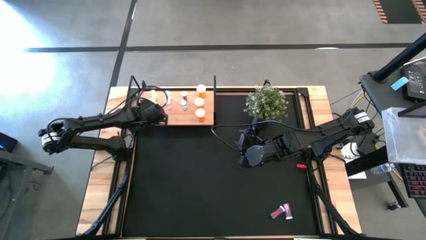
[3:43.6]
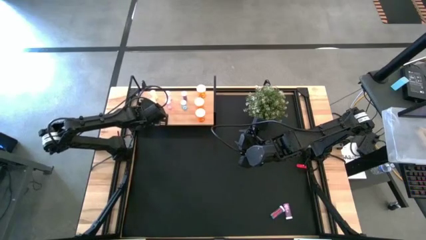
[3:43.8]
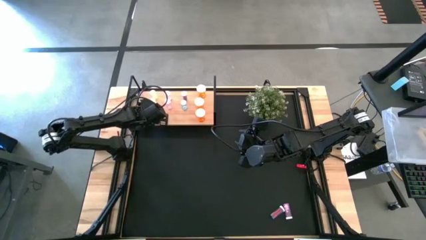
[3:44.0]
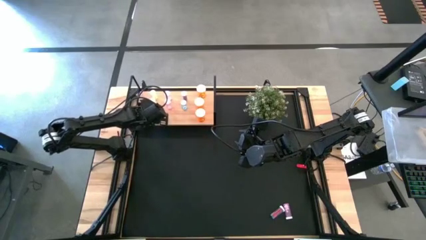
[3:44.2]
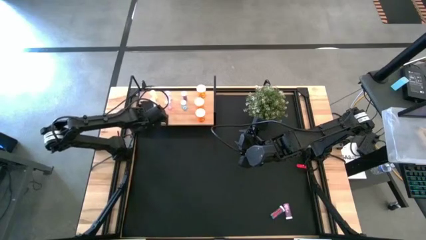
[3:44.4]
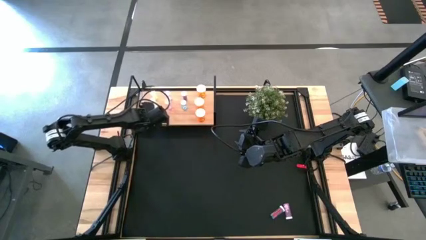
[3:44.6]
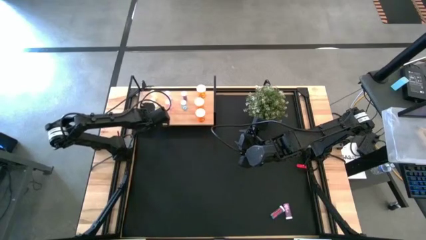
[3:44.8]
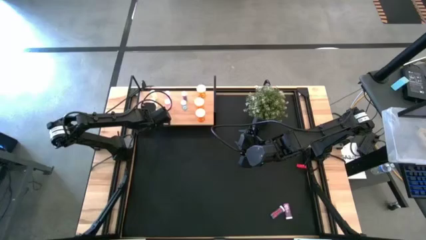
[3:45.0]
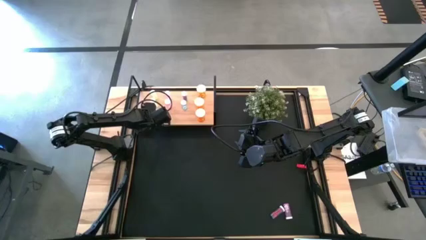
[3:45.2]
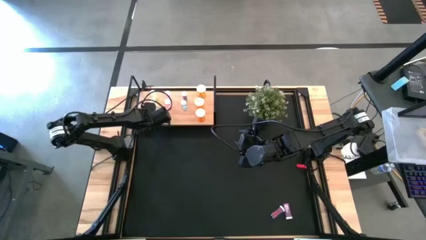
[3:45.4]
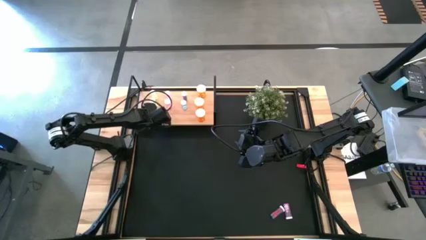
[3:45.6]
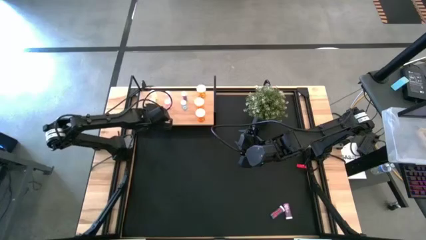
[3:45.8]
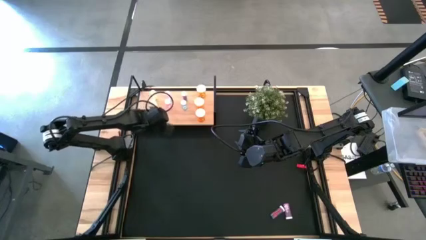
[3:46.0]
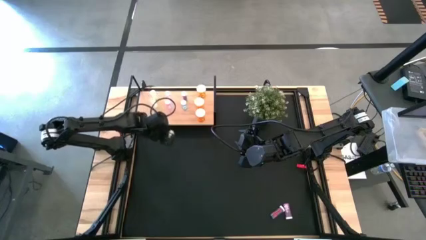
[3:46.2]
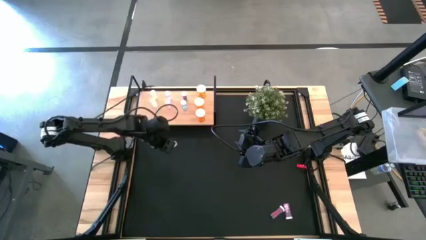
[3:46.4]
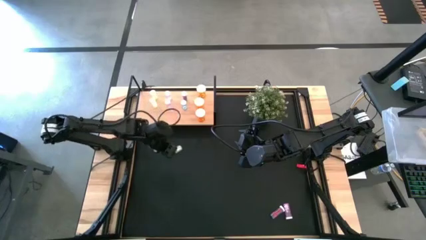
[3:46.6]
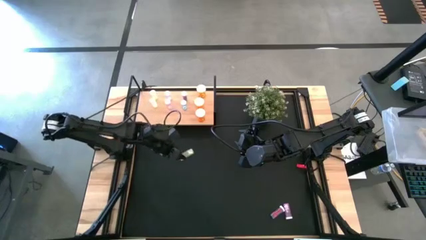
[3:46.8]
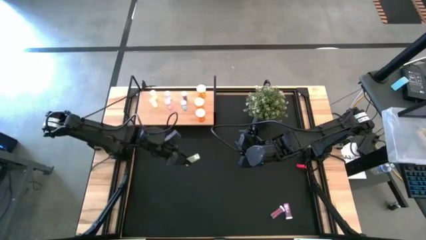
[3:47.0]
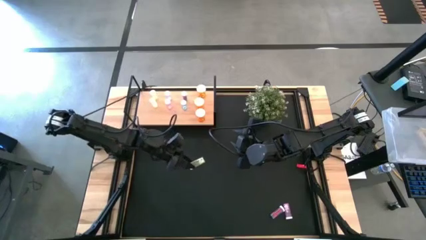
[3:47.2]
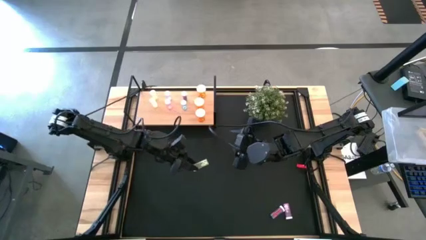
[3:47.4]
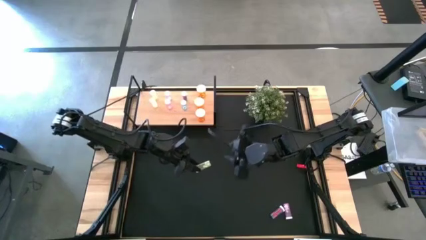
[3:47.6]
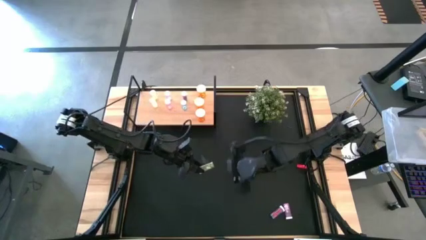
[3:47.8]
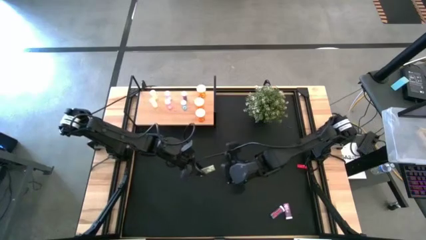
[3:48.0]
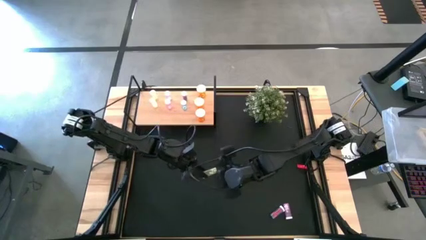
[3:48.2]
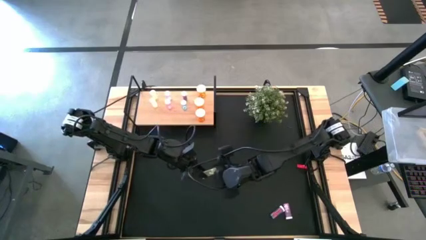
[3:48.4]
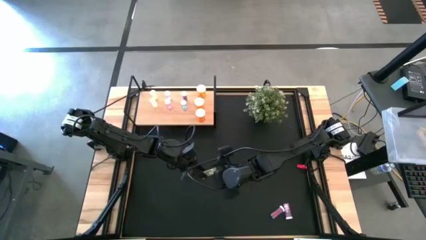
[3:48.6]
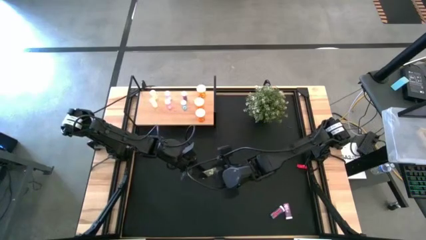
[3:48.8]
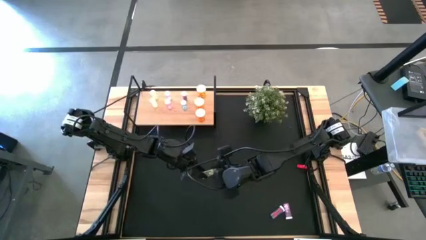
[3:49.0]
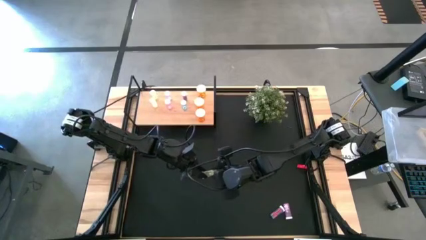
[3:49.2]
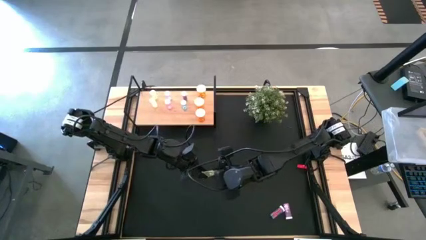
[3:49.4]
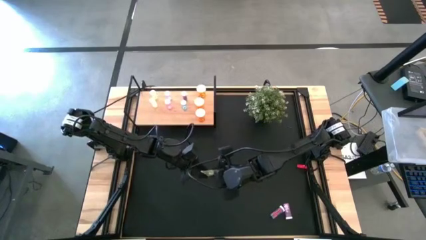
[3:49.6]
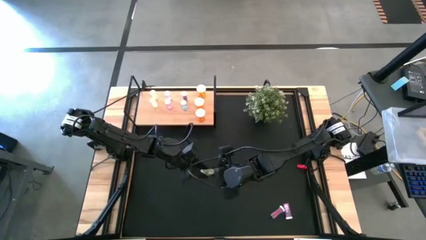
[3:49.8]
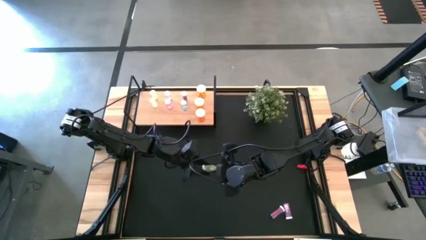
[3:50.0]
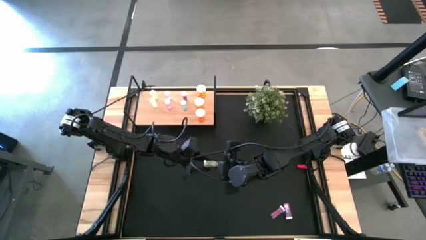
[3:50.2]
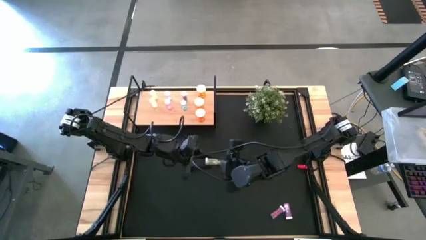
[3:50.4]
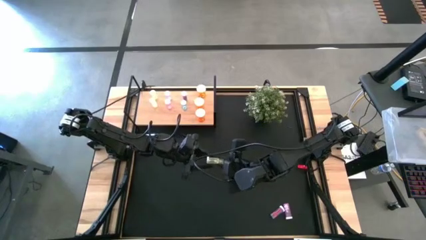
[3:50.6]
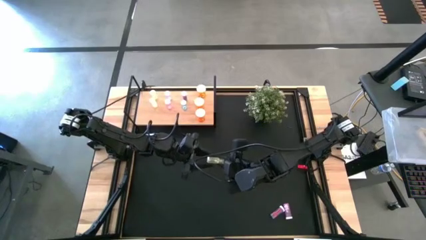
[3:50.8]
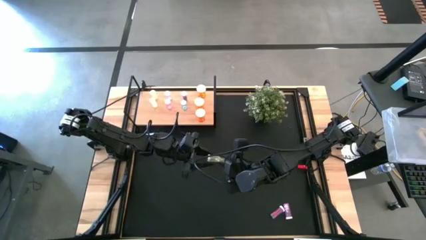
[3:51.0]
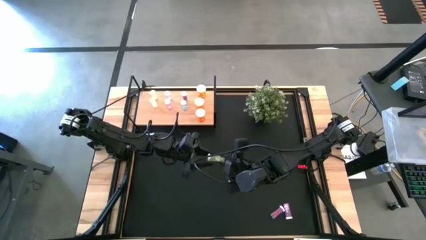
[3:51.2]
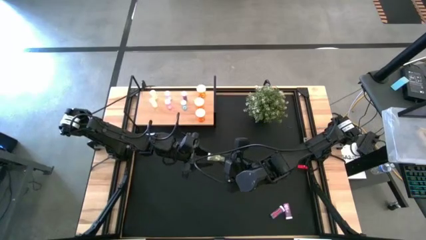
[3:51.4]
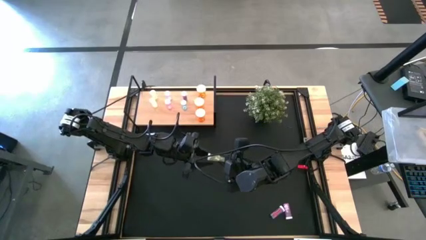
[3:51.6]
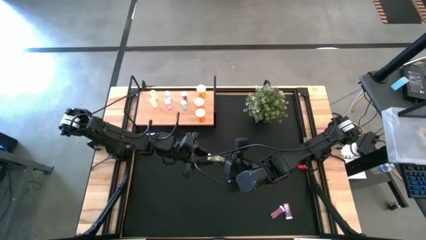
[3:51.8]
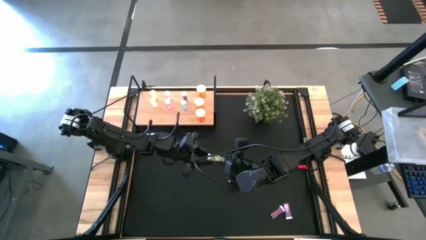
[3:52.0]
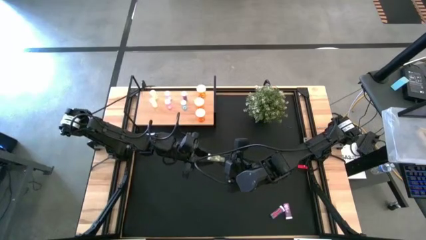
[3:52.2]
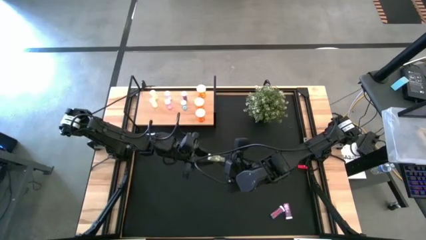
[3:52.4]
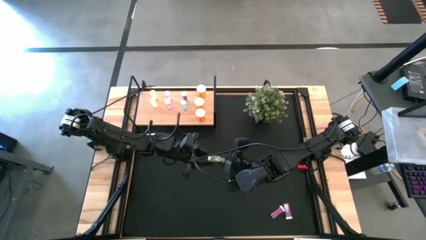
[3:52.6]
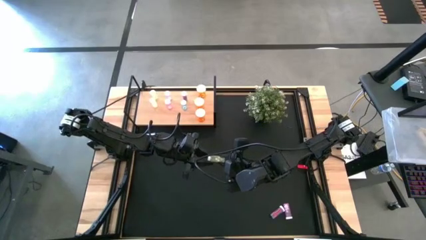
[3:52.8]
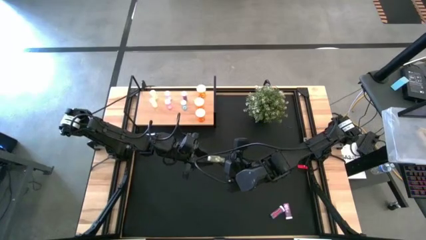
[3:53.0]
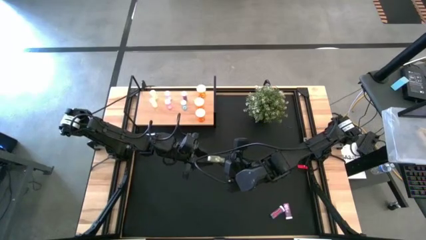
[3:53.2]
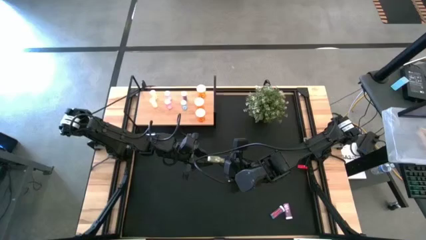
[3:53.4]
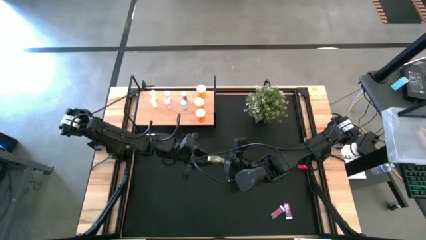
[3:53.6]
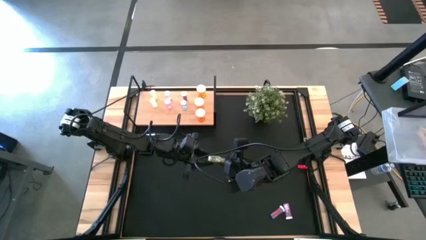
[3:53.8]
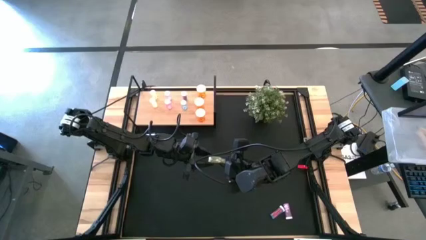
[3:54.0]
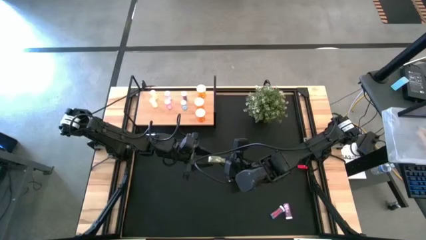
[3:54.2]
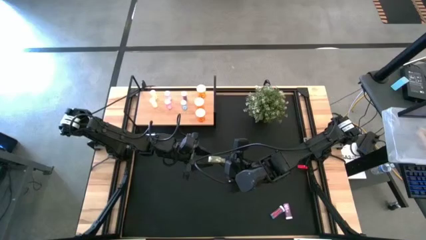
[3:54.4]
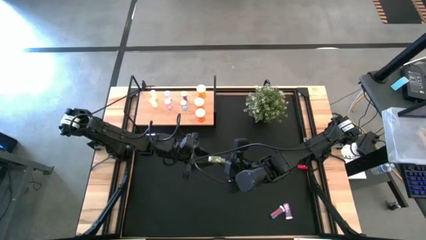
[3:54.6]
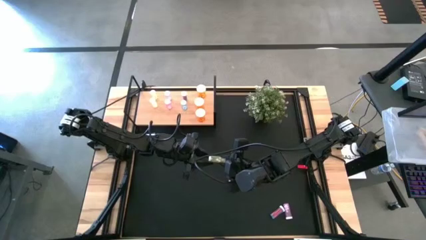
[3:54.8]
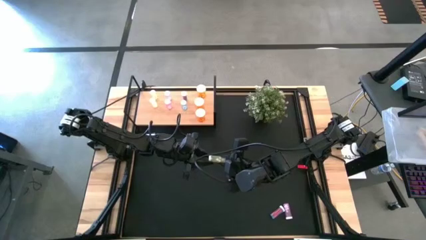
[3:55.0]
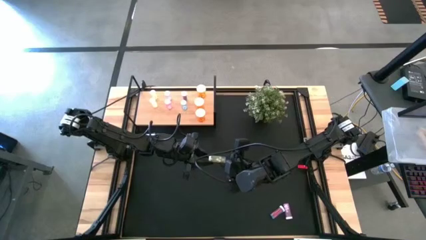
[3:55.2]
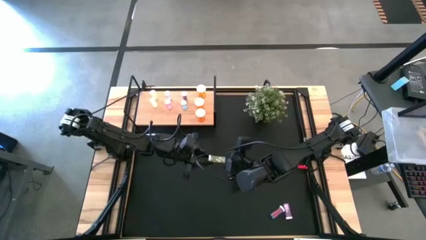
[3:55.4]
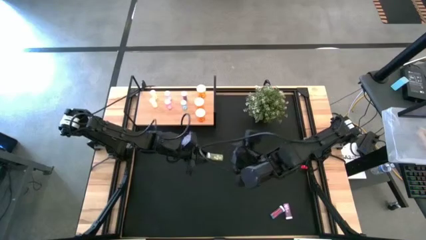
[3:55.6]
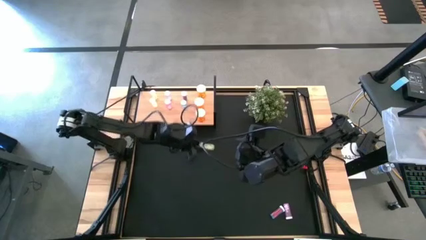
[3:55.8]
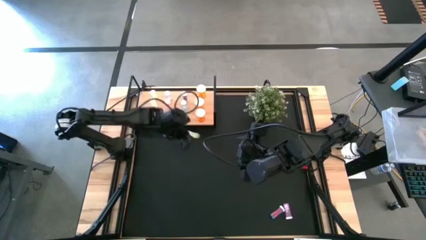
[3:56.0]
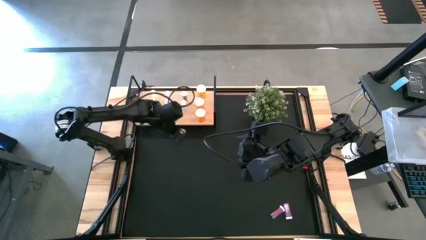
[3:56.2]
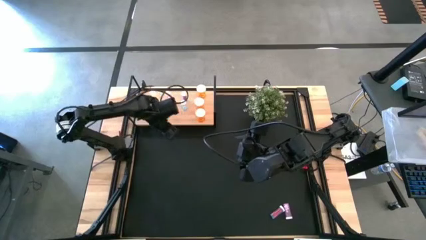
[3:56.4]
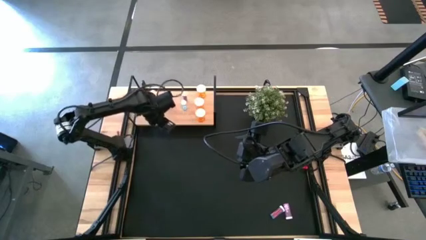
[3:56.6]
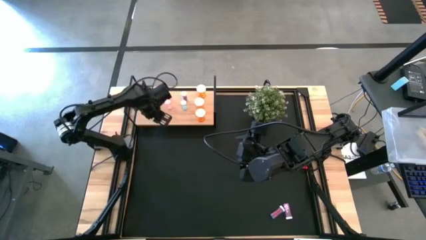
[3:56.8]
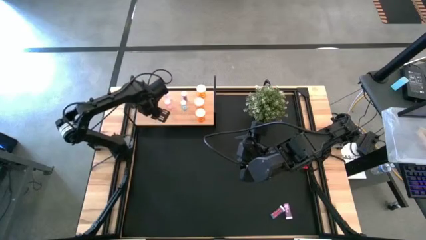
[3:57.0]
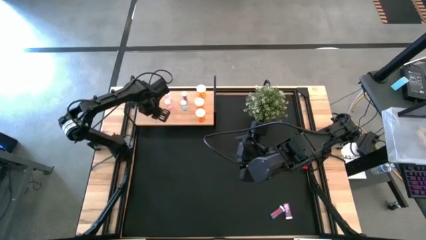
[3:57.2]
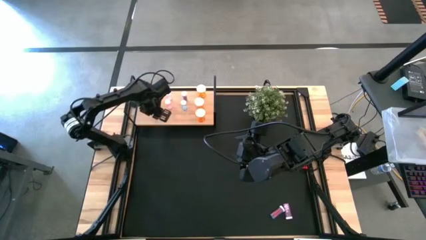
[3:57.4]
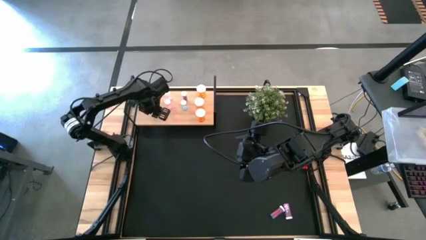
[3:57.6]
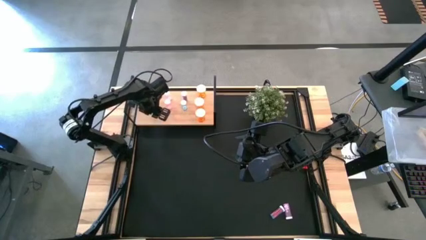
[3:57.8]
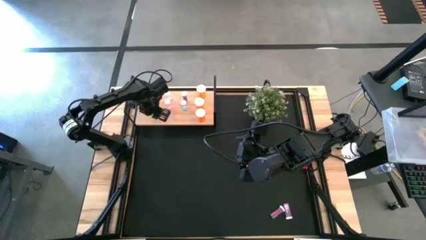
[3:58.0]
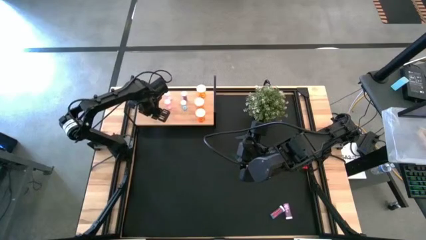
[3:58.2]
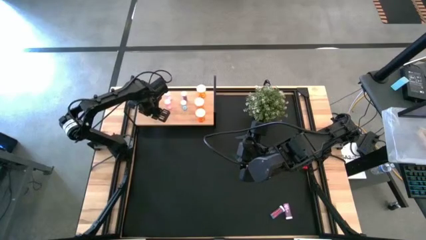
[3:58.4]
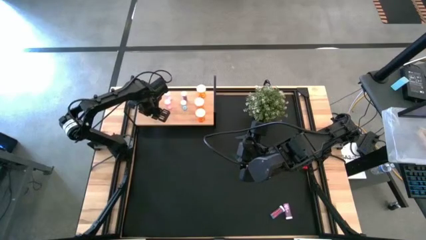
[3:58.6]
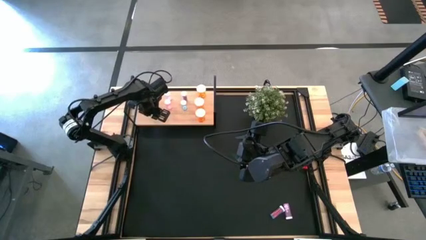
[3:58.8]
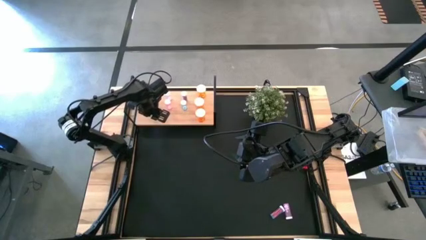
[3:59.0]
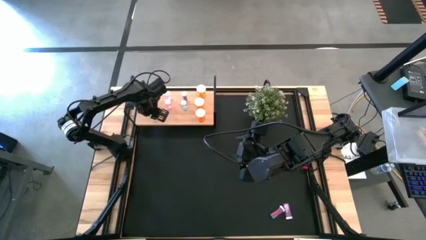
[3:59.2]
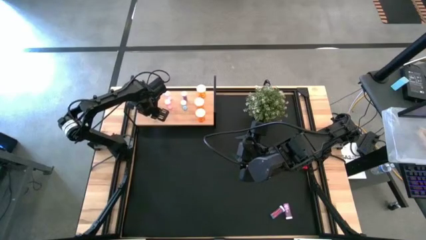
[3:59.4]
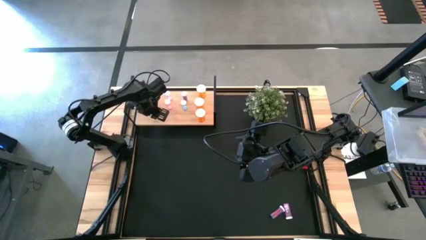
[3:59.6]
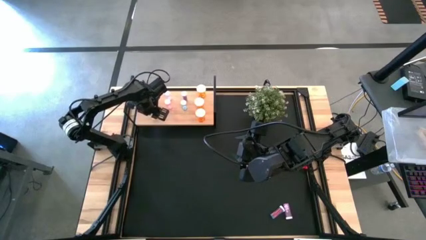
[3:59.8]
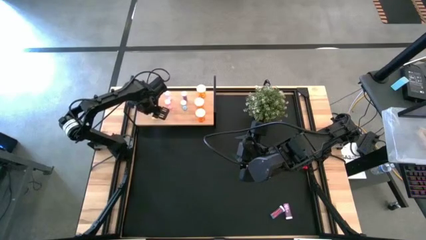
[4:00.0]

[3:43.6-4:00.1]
Task: Pick and place medicine bottles onto shelf by color
Put the yellow medicine bottle on the shelf aligned with the other yellow medicine bottles

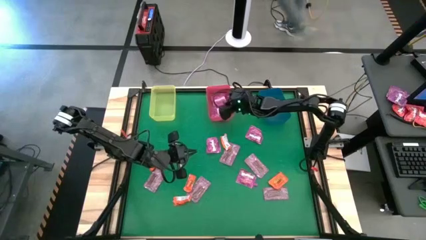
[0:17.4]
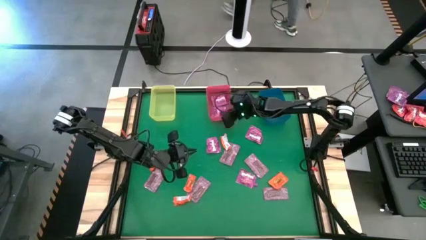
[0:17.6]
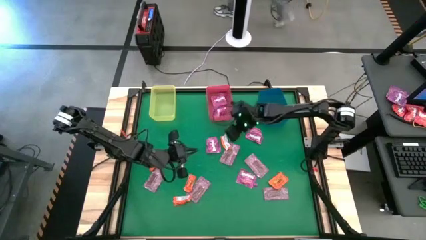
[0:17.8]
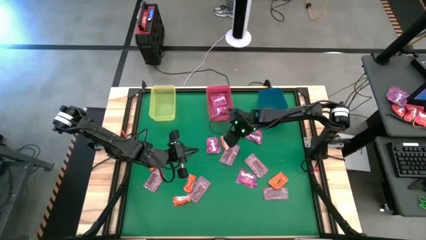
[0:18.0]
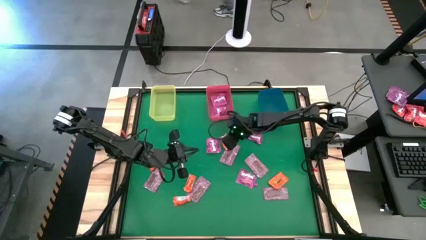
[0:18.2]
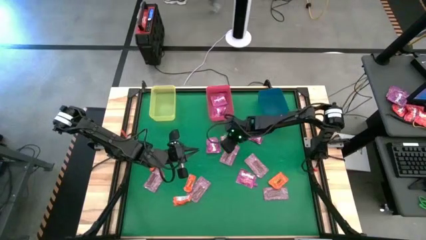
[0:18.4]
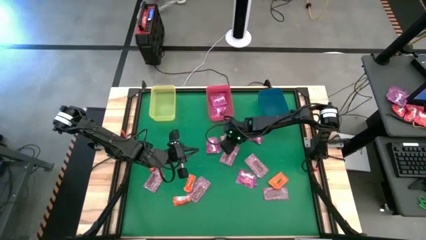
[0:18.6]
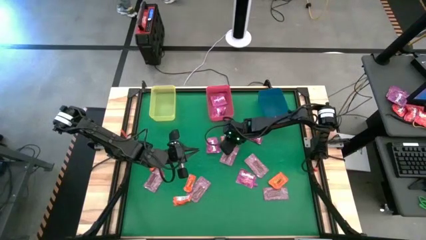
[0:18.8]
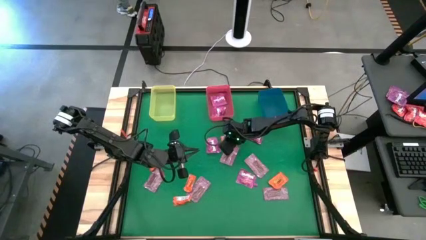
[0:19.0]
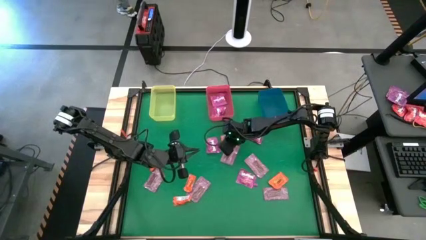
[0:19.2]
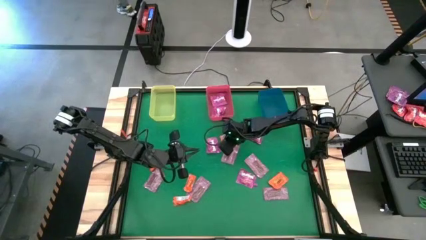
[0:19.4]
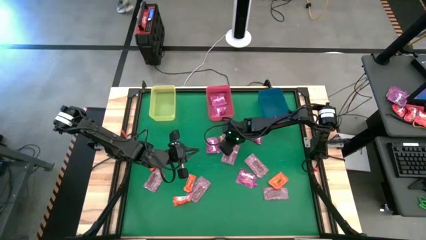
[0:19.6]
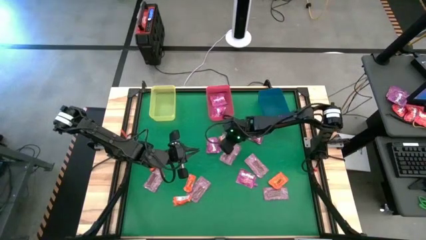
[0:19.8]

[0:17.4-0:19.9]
Task: Sort candy by brand, put in halloween buckets
Put the orange candy into the blue bin
